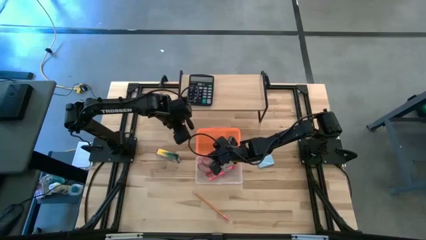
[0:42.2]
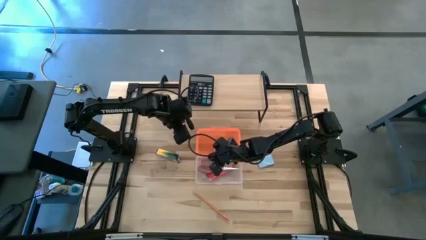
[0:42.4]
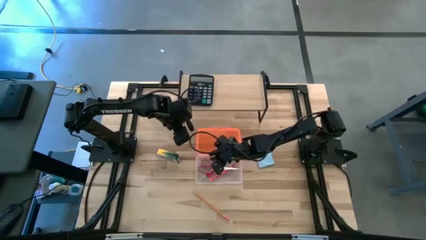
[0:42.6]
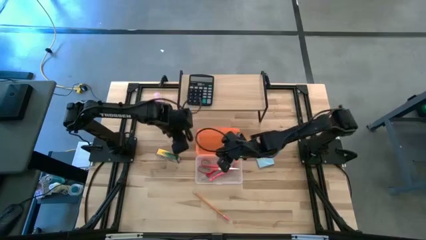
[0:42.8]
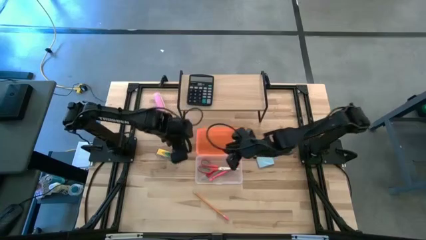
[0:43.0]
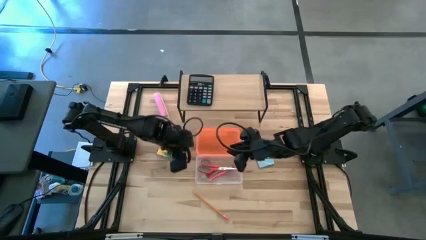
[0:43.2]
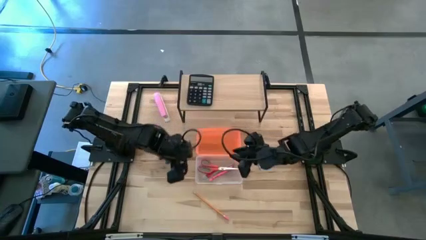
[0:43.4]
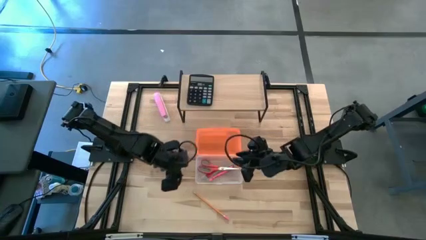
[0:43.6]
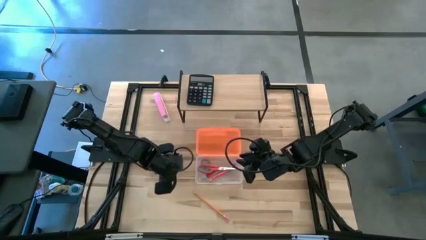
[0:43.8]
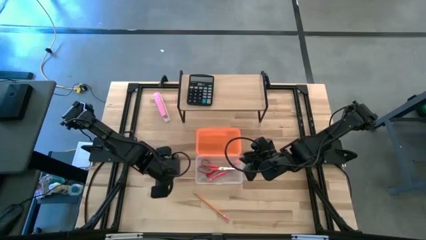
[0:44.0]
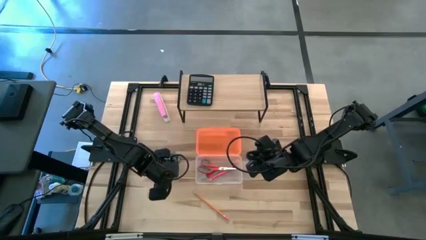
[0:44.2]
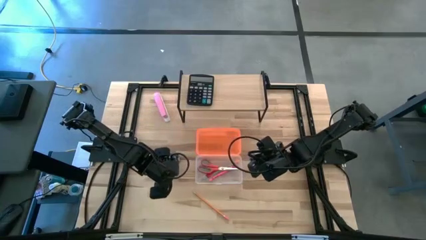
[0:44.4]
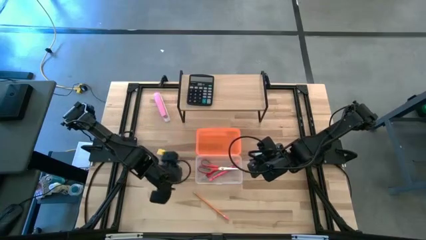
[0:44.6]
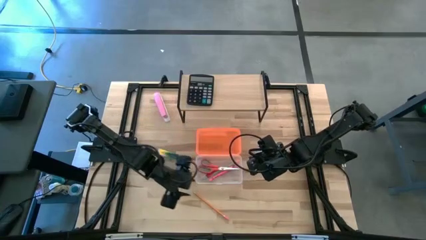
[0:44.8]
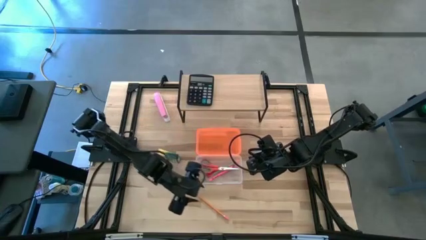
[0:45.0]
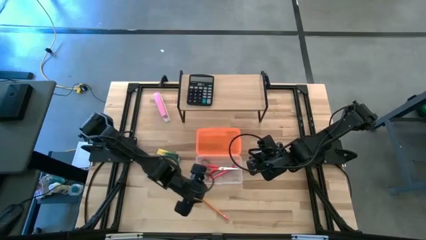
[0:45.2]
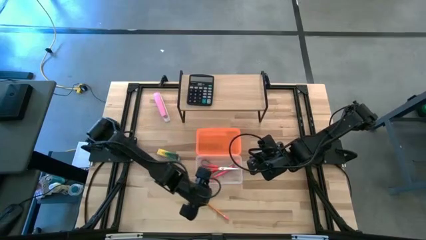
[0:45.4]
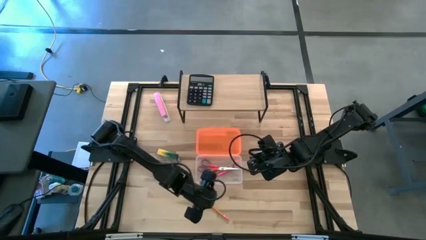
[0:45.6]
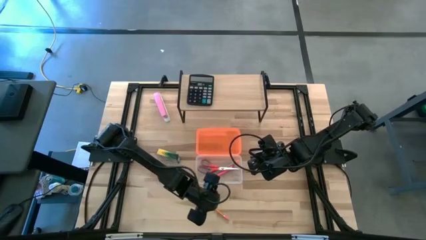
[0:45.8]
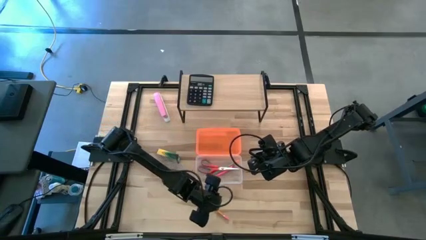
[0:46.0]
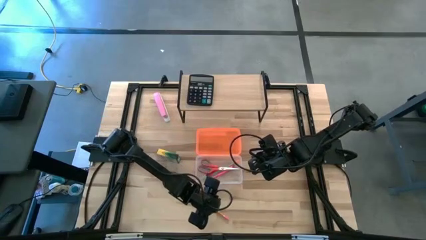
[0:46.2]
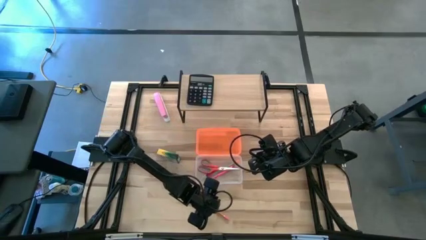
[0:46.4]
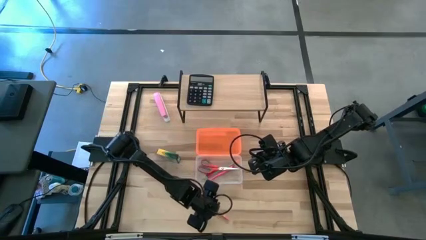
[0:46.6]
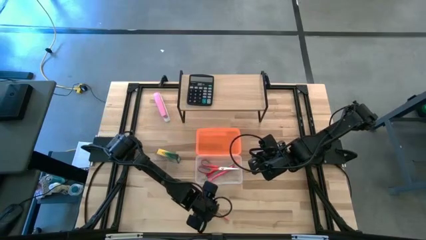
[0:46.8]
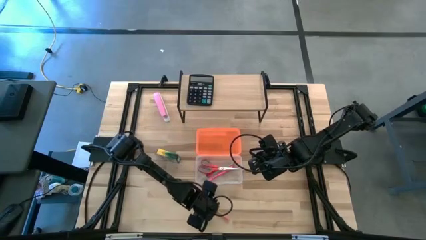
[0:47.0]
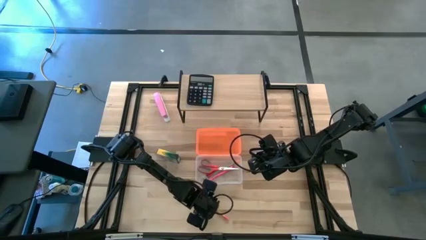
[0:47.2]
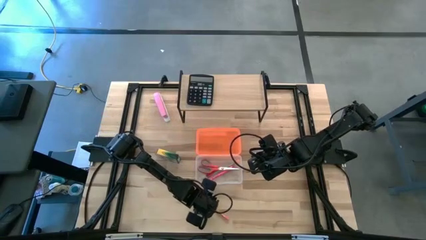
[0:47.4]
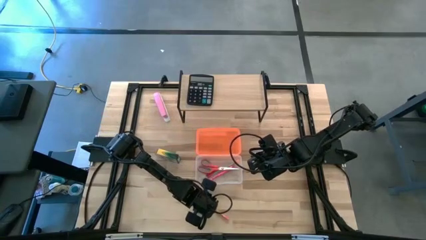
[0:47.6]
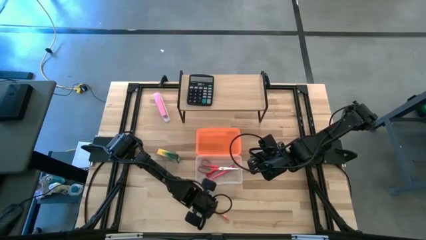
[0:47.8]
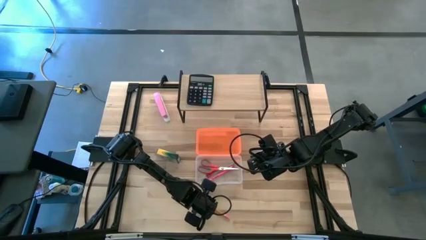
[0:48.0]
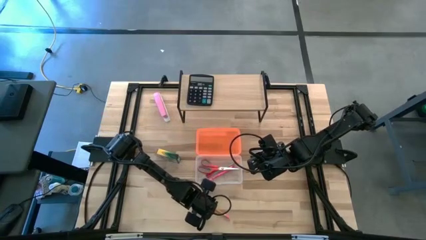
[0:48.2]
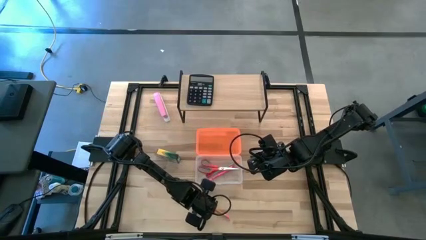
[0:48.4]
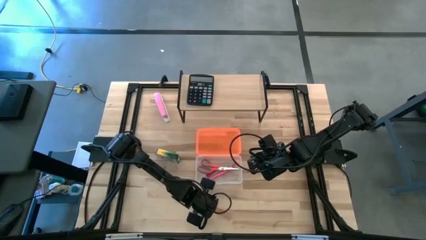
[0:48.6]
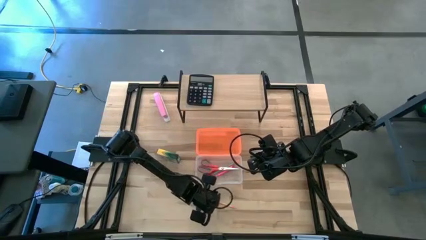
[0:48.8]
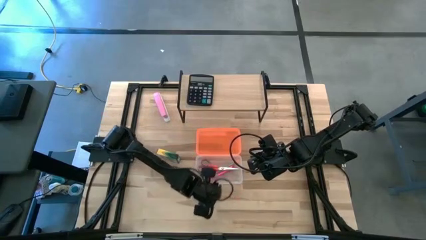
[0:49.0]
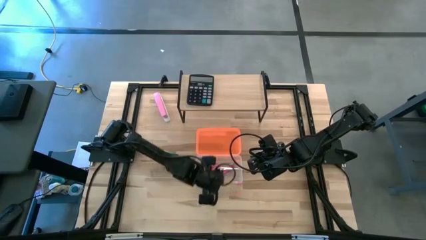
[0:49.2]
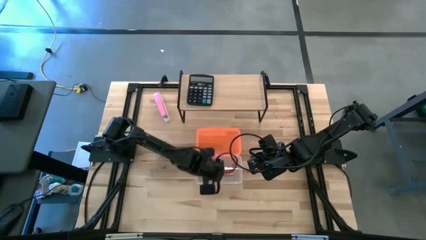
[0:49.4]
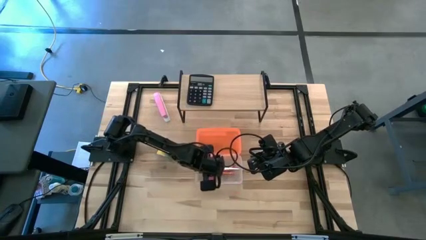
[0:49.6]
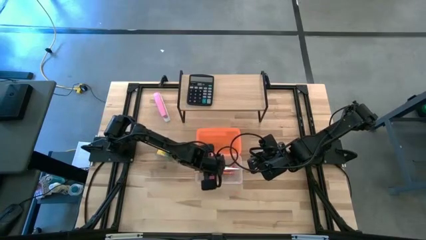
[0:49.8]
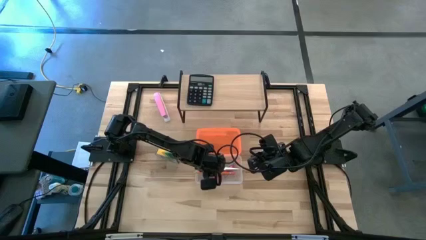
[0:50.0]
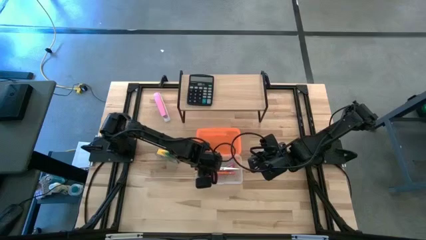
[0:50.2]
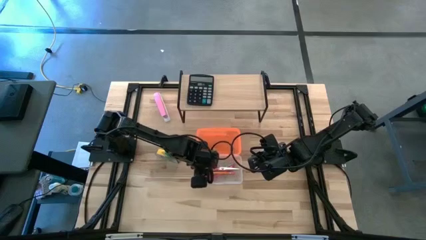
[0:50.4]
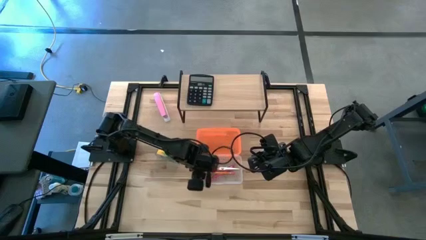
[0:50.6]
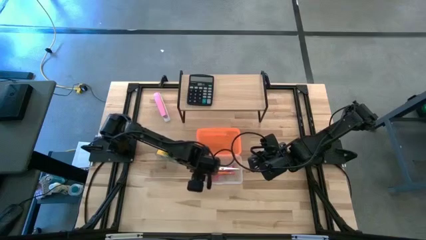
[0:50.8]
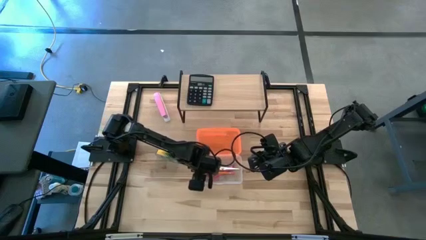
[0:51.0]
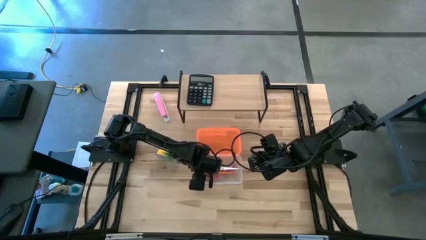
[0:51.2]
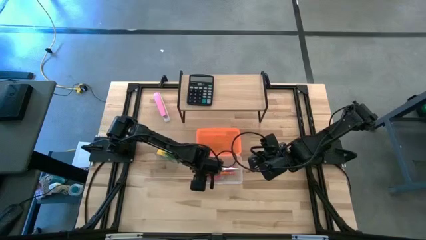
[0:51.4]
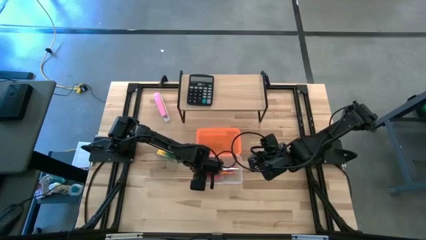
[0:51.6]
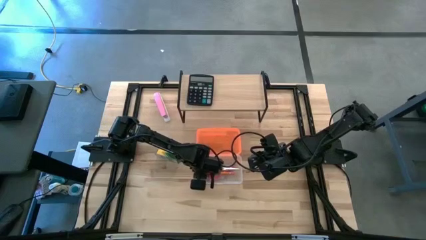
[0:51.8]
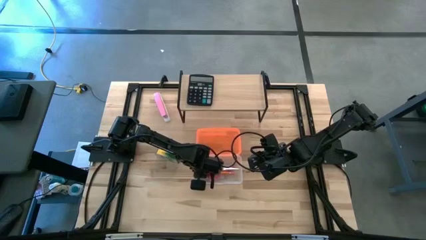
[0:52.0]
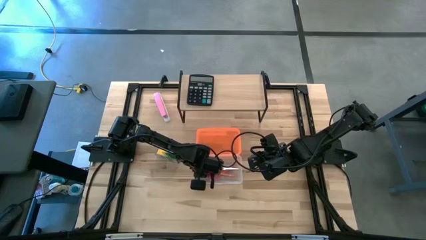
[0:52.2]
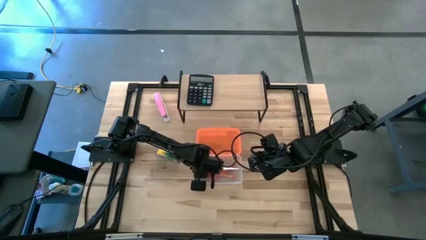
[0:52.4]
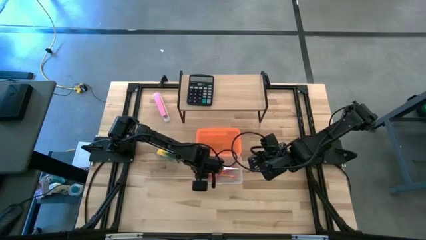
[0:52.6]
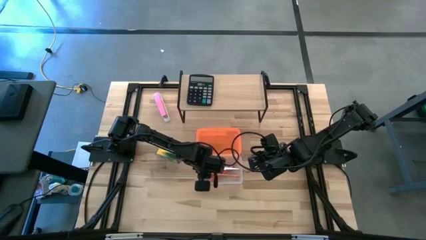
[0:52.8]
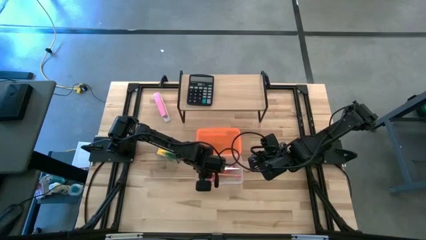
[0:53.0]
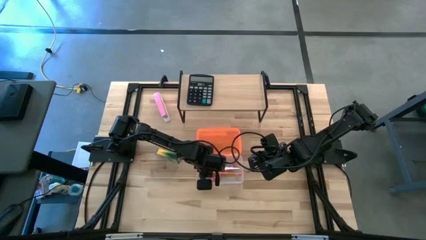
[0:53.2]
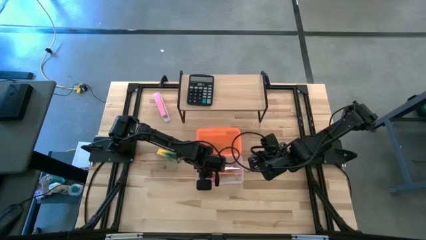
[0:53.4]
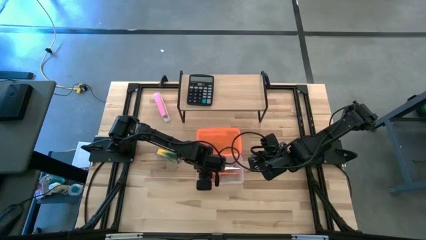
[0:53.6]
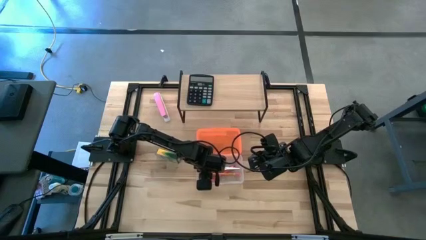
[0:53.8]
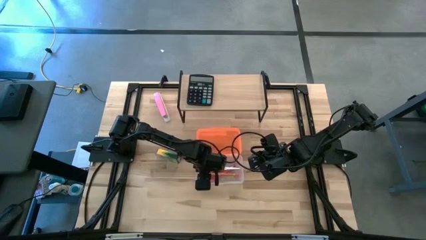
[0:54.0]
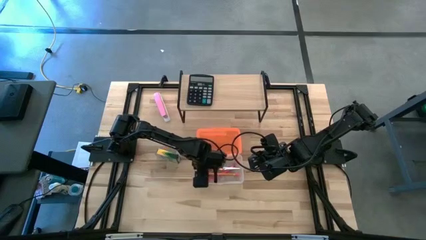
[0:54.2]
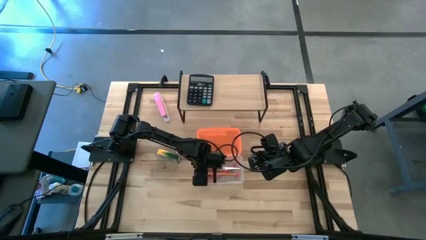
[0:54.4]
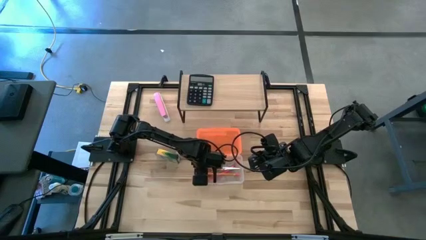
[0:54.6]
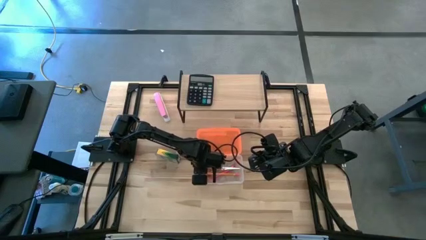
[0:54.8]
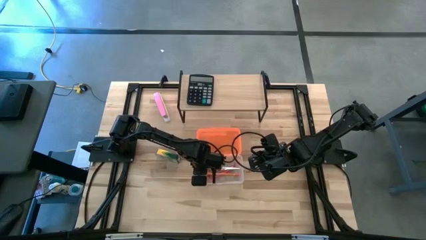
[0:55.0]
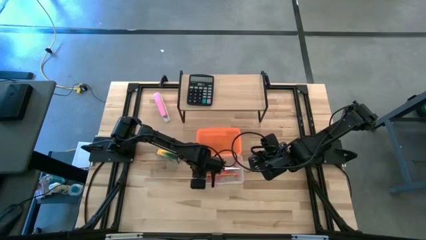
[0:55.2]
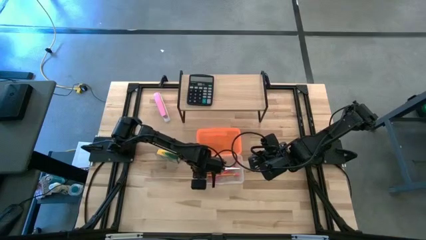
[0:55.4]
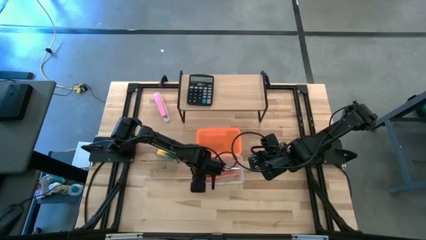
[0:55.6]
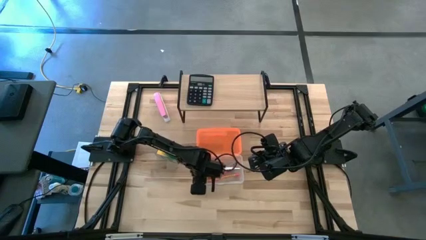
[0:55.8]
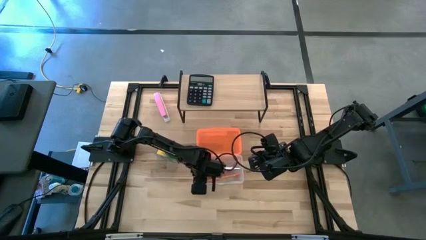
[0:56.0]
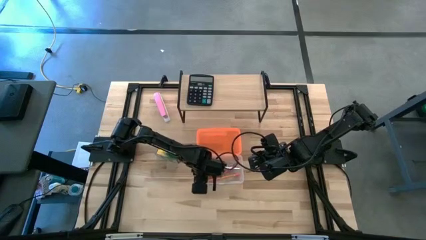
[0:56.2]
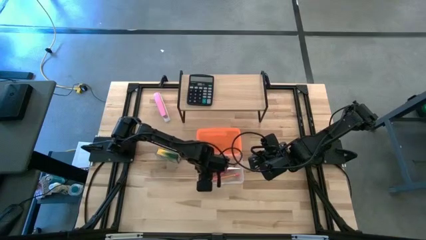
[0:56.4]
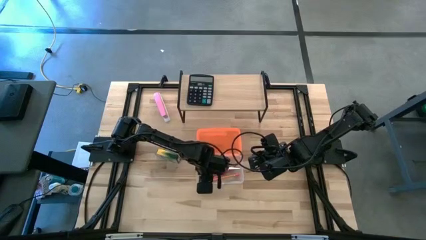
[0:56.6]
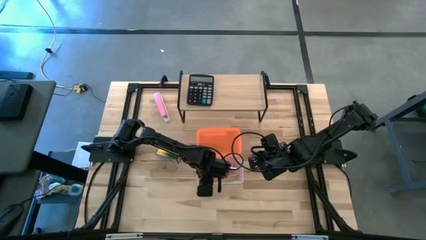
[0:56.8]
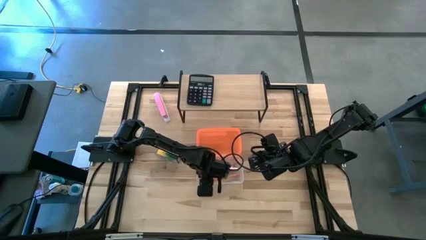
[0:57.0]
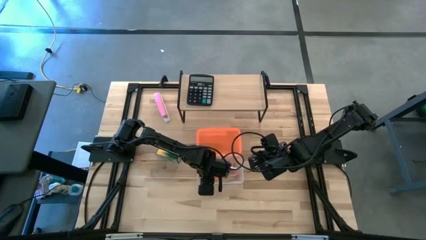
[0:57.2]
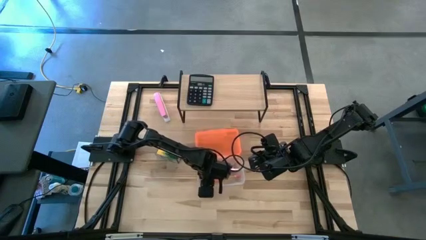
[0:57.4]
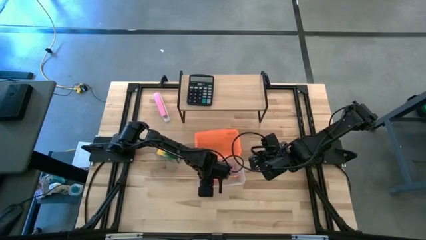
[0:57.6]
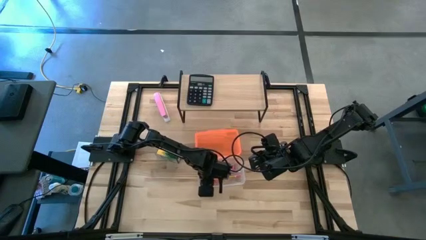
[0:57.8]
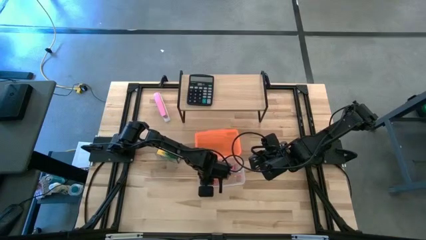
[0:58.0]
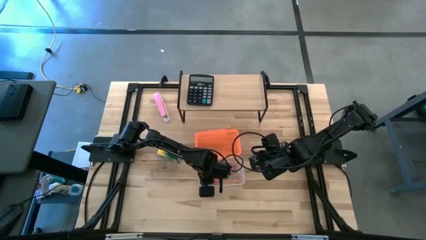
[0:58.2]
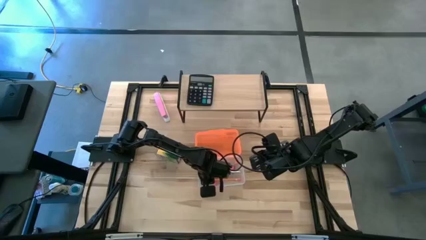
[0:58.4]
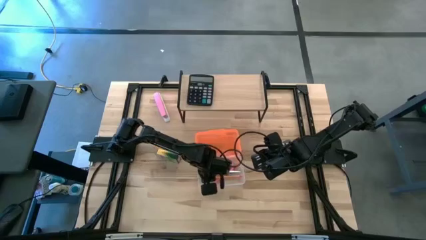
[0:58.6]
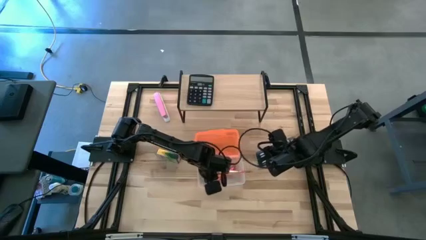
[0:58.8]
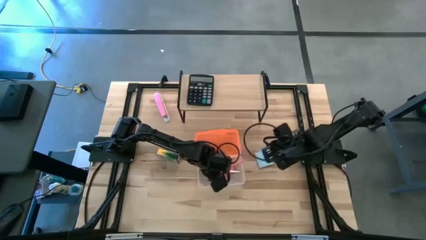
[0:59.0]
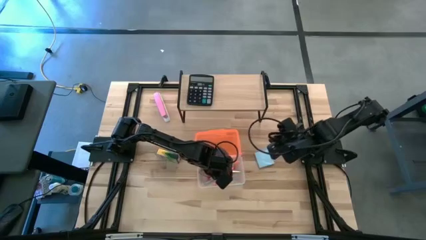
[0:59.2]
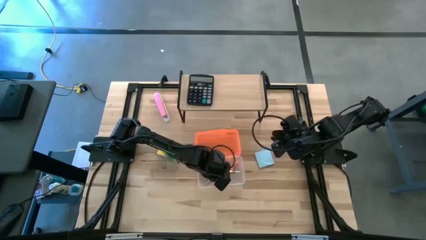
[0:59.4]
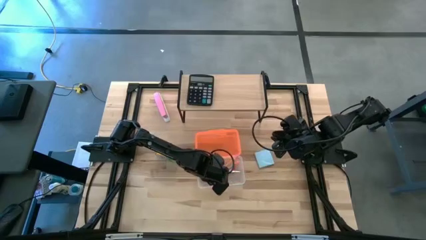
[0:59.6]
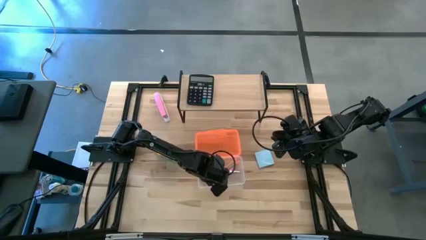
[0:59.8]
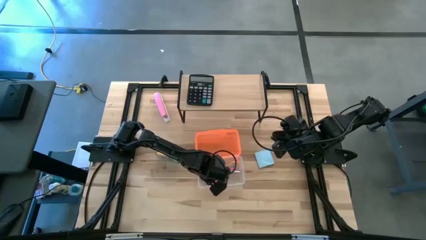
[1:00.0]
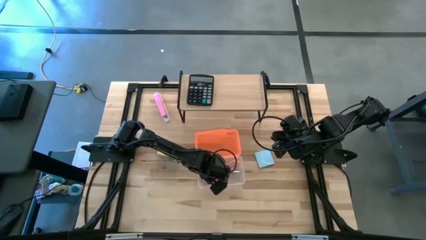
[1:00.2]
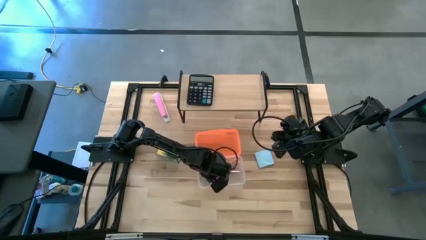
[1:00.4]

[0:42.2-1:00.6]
Task: Pack school essentials
Put the yellow pencil into the orange supply box
